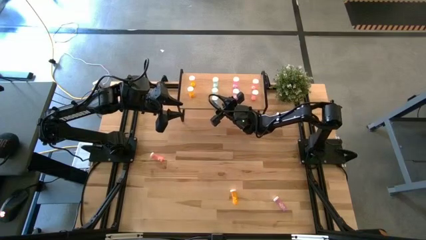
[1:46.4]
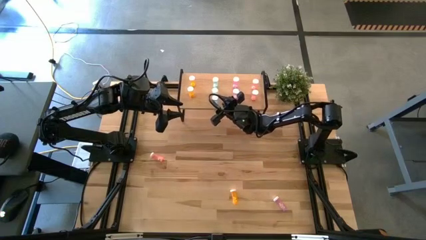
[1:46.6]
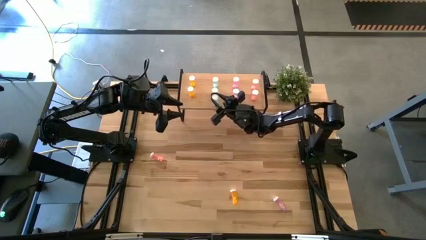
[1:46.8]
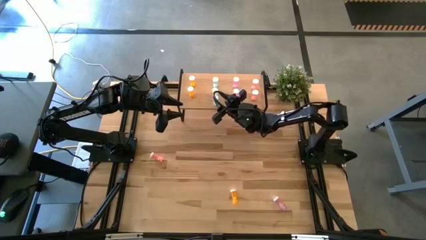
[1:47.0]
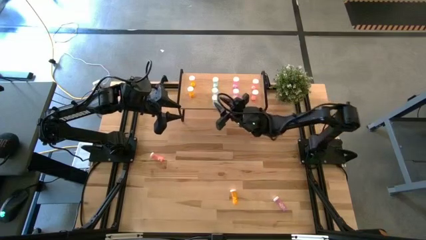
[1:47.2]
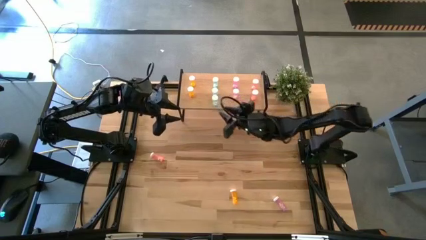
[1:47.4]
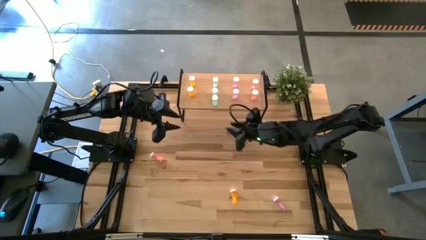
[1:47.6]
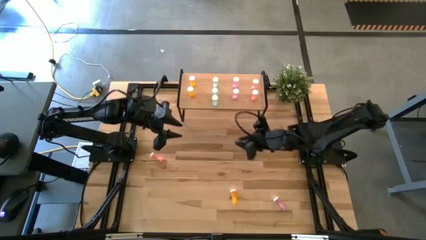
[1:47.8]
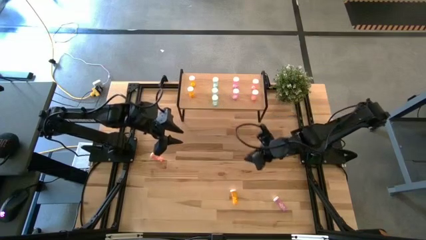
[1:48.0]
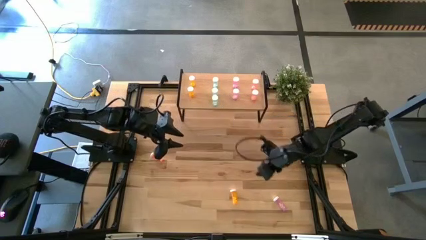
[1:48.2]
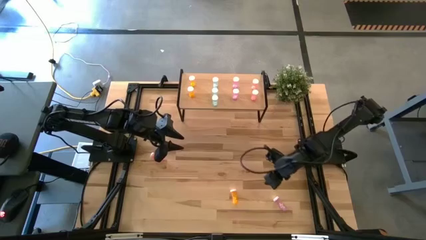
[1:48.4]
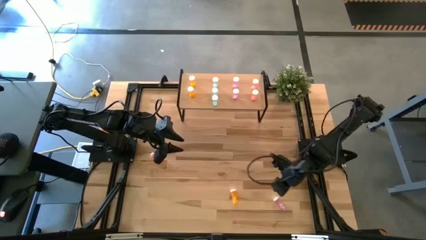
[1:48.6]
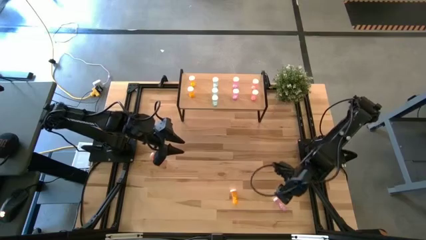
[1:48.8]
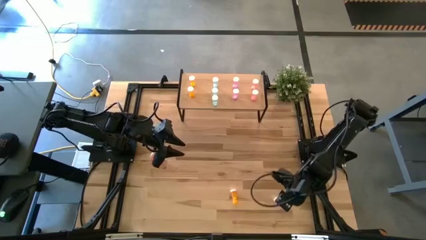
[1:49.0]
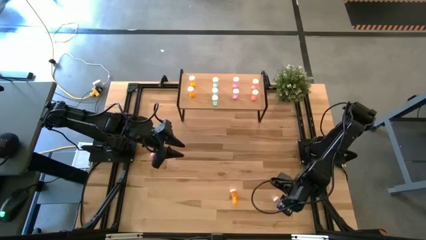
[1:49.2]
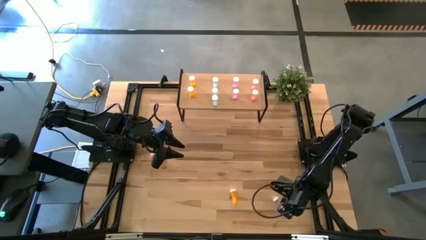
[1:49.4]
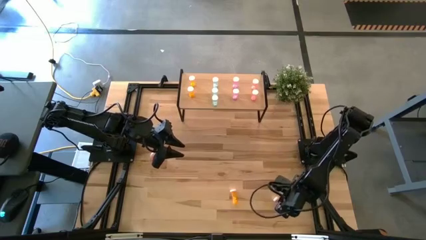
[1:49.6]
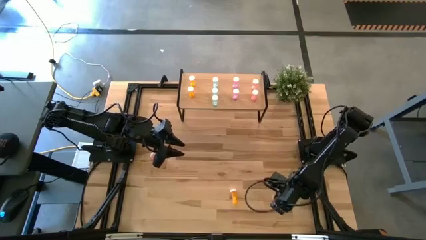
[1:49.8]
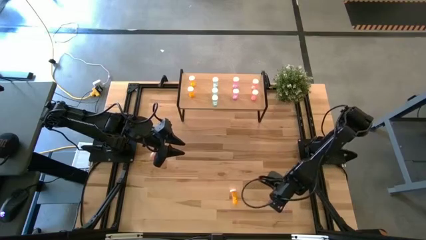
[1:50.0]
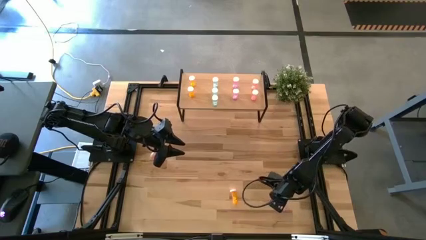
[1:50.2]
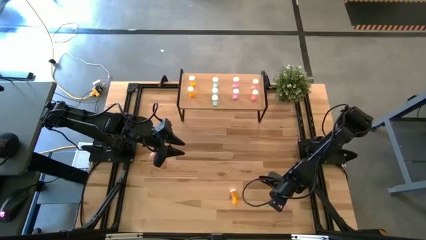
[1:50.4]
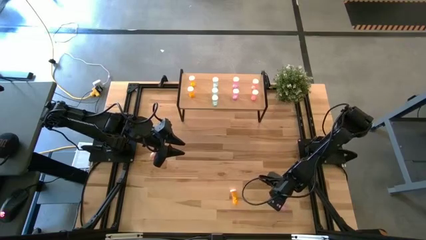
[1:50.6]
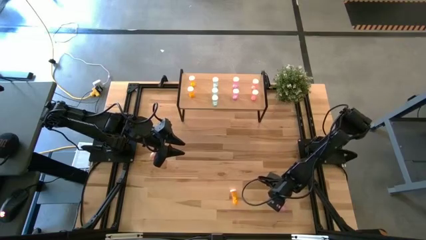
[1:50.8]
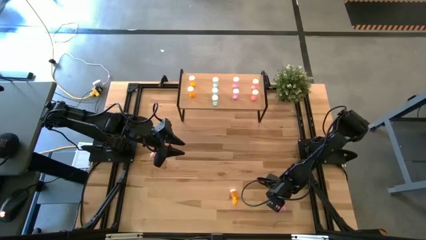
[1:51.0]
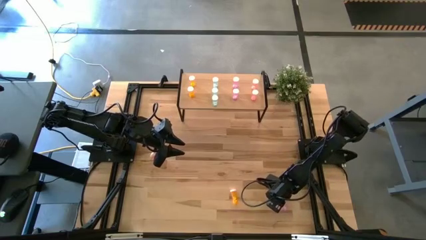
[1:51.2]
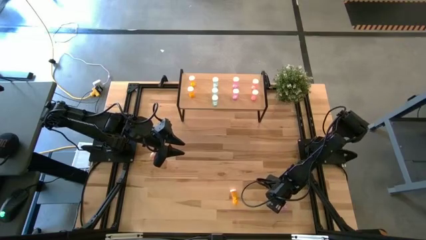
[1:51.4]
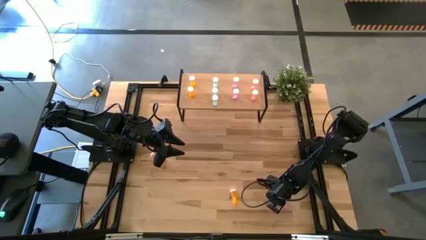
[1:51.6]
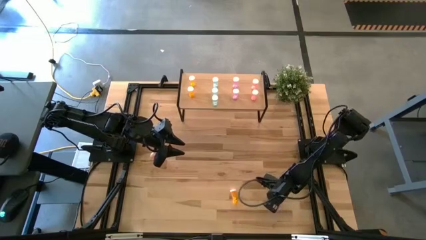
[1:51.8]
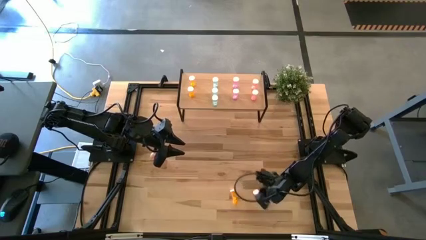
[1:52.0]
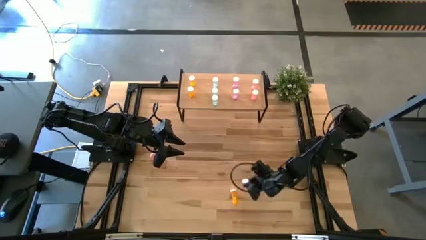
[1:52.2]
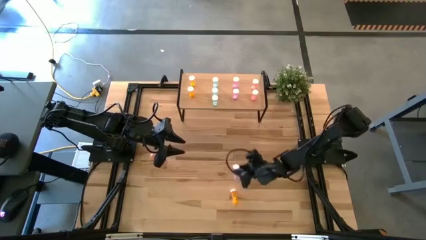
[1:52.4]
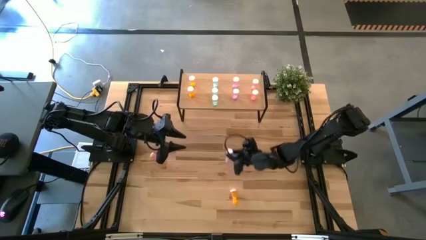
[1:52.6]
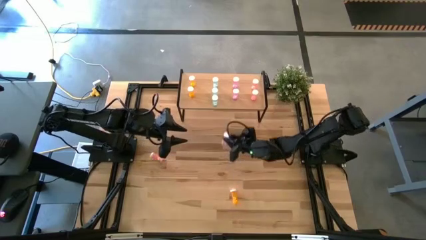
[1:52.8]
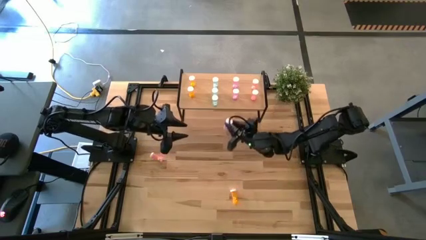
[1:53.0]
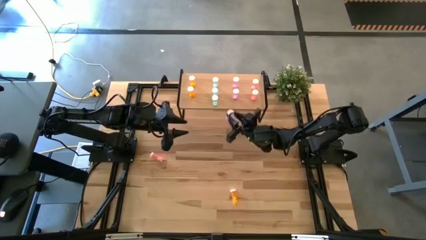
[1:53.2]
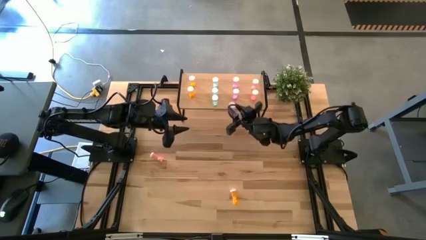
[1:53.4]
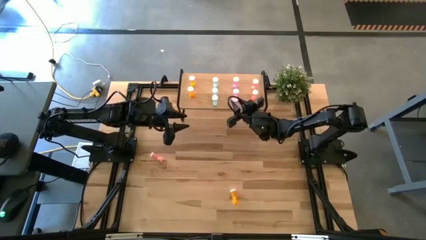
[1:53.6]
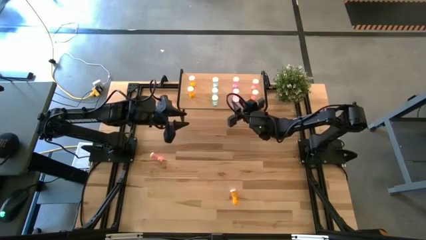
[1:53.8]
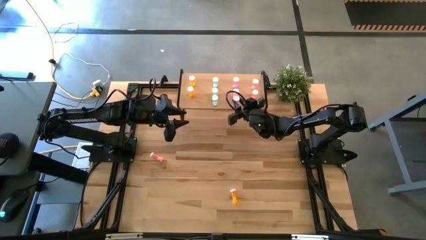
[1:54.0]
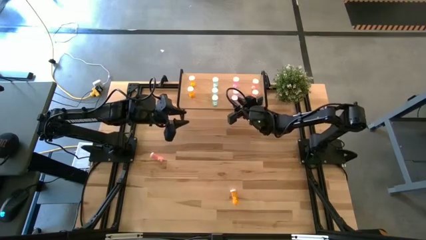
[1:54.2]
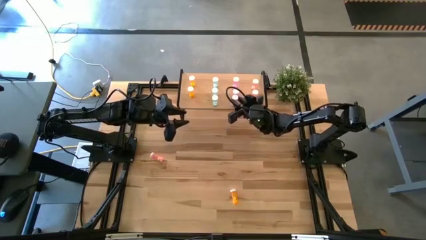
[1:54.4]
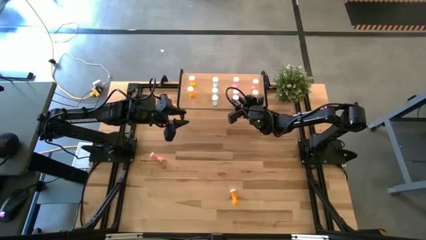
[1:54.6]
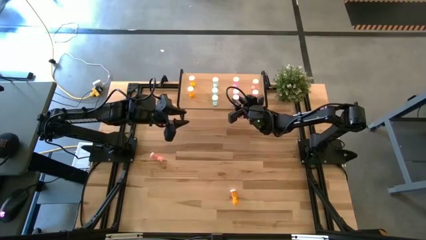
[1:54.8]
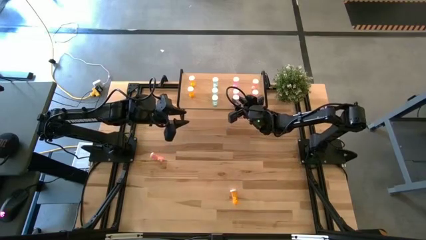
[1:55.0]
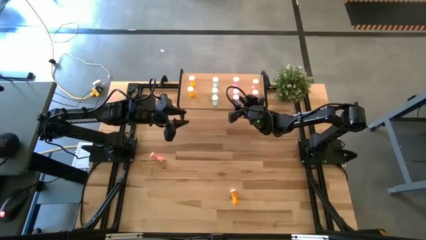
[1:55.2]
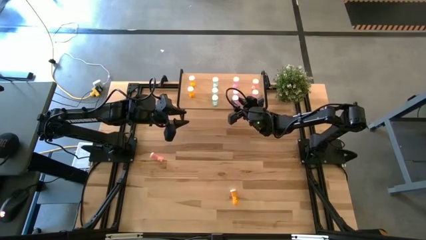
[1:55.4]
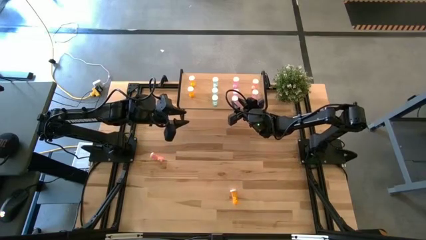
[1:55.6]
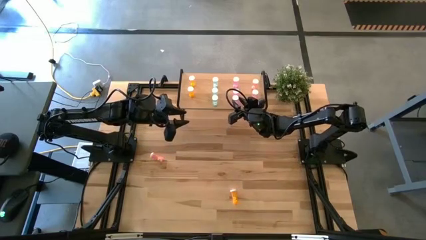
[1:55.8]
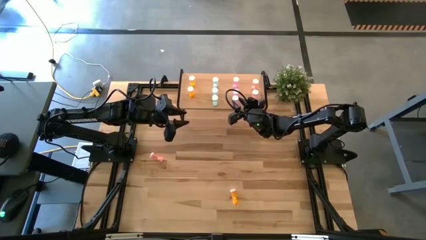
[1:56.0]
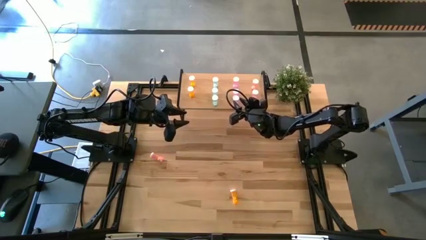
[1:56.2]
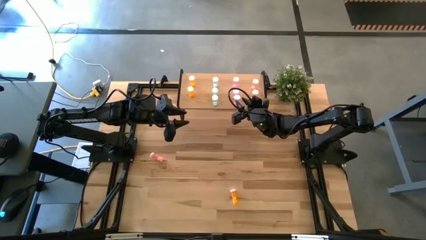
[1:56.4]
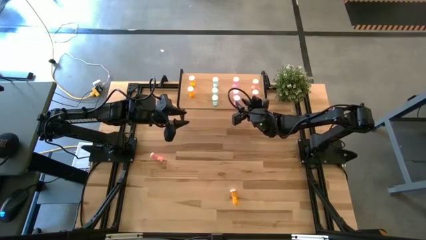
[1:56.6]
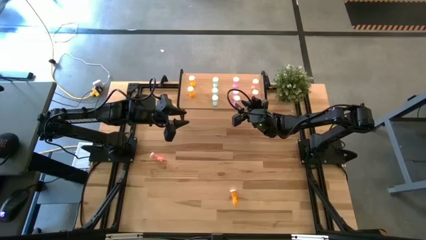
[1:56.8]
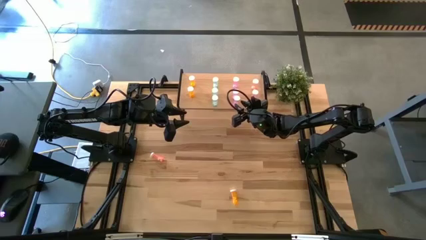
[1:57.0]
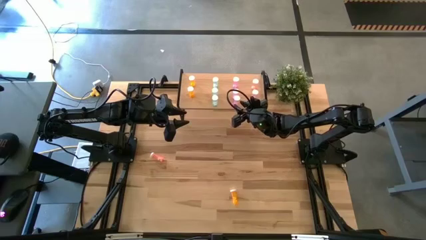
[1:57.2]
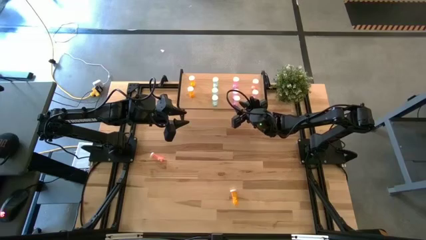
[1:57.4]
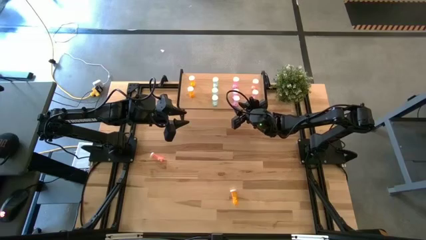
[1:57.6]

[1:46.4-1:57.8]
Task: Pick and place medicine bottles onto shelf by color
Put the purple pill bottle aligned with the other purple pill bottles

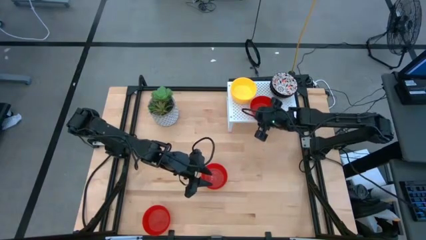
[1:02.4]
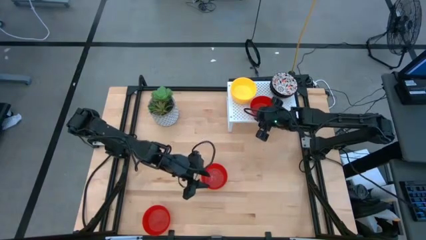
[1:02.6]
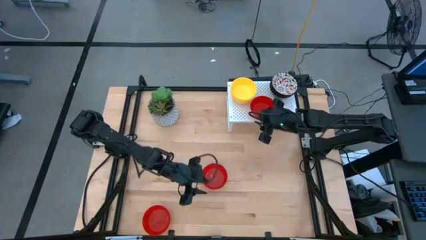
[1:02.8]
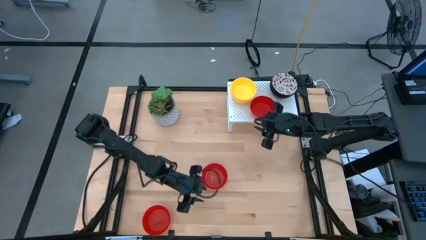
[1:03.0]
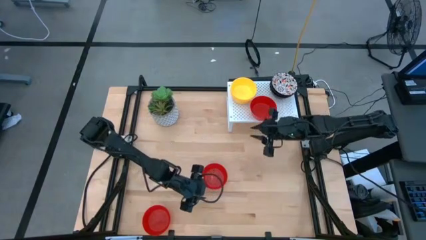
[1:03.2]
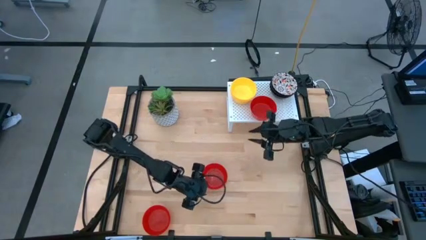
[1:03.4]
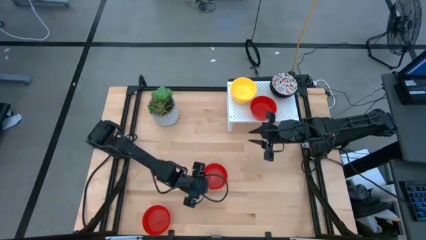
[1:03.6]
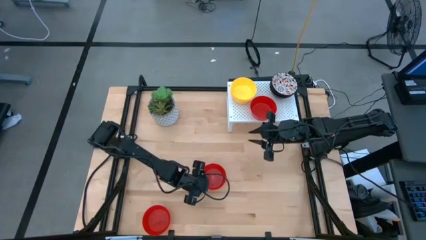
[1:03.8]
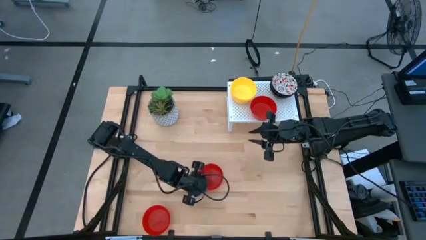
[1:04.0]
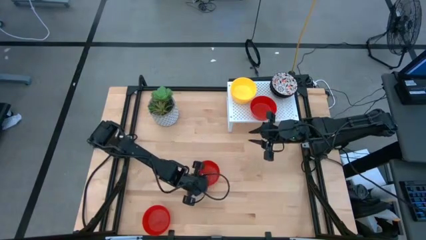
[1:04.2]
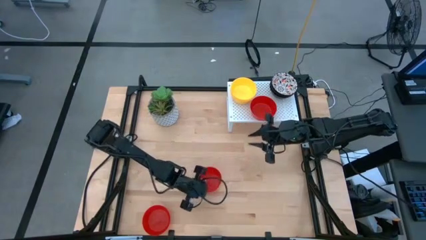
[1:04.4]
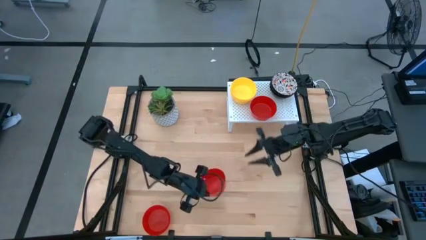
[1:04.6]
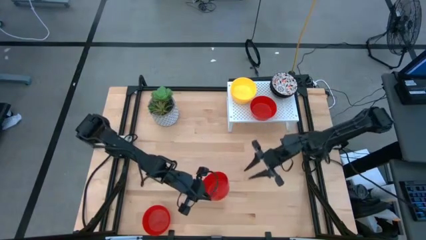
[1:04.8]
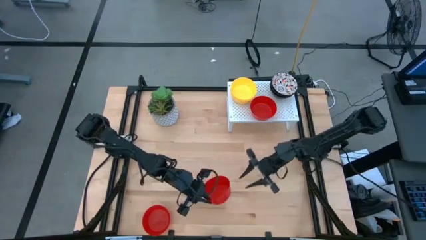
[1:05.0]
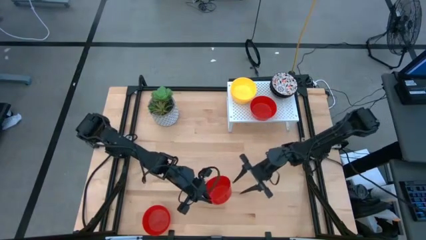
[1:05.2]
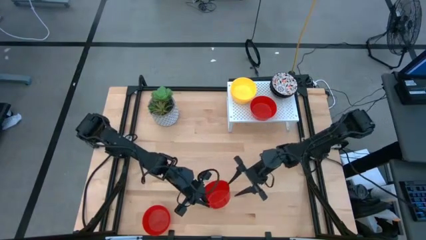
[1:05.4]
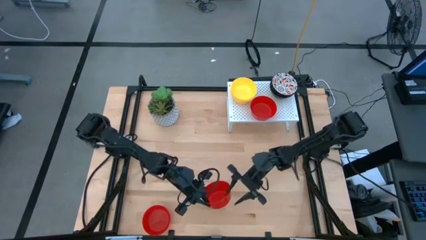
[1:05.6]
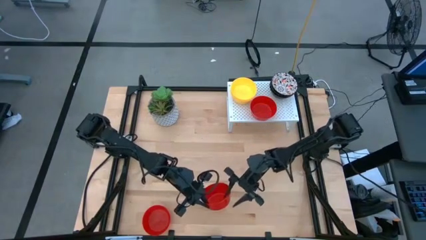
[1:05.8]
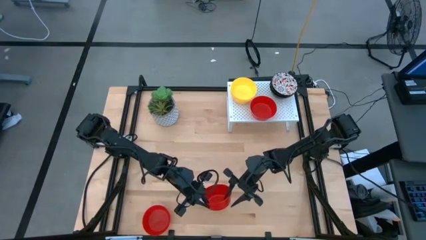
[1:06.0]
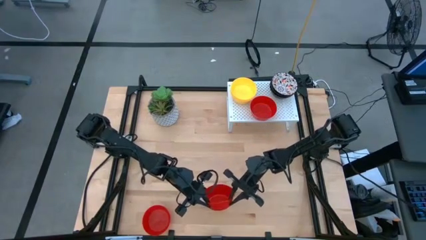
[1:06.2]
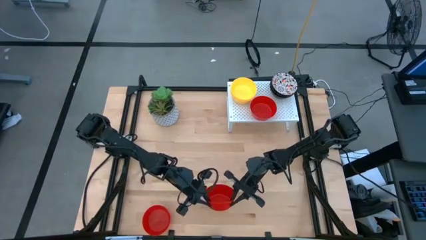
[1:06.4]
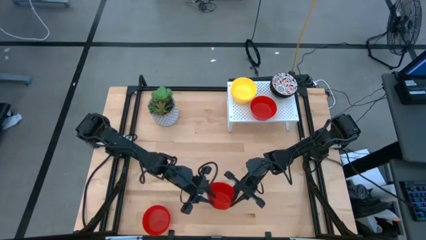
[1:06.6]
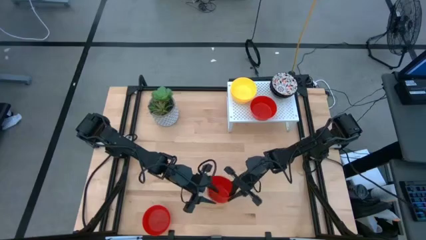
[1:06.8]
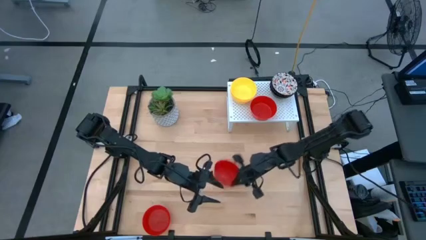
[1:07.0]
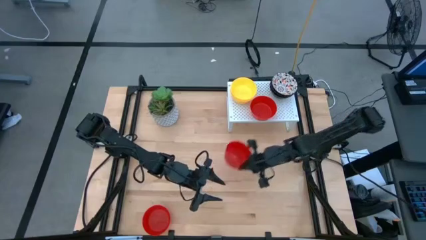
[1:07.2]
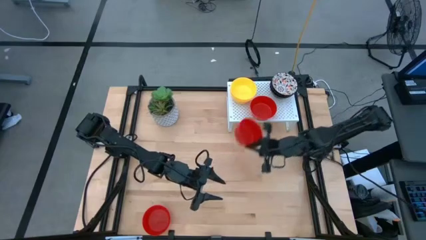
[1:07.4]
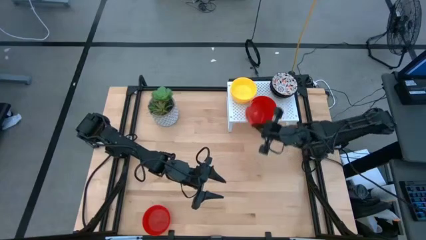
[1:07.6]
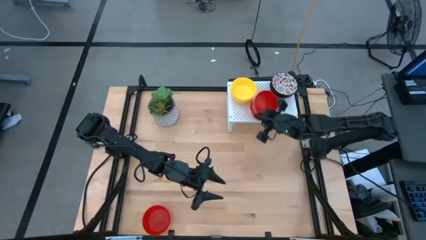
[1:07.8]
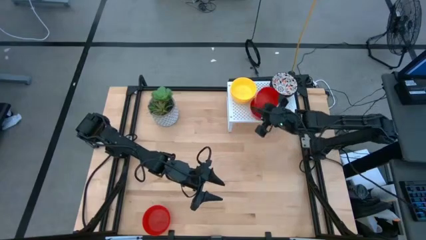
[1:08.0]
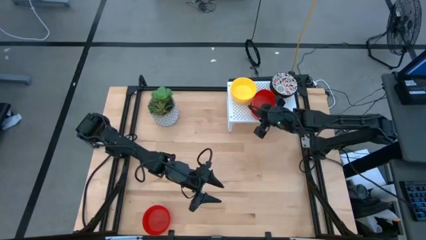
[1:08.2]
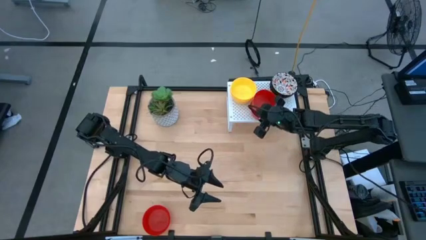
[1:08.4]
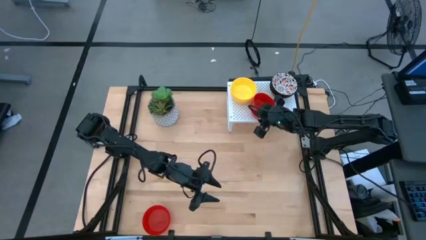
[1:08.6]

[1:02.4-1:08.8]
Task: Pick & Place Mini bowls
Stack the red bowl on top of the red bowl on the shelf
